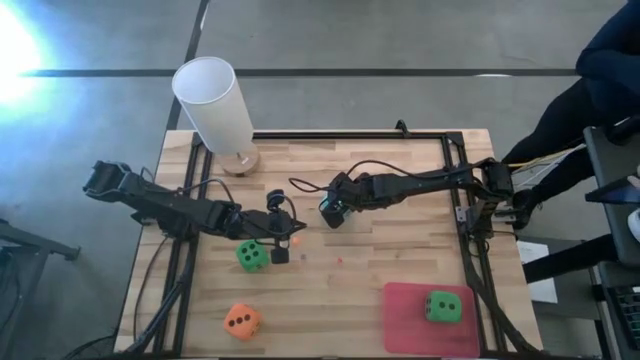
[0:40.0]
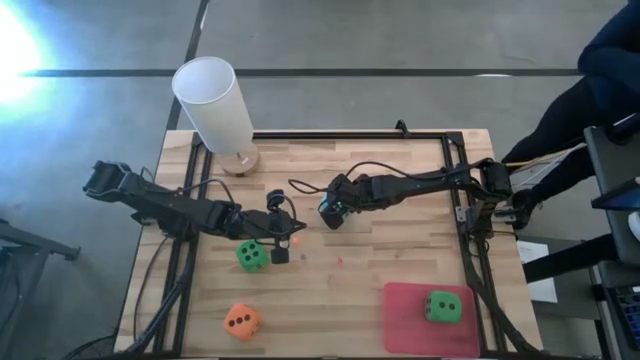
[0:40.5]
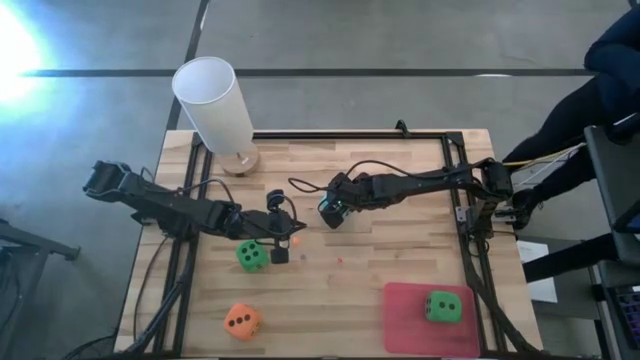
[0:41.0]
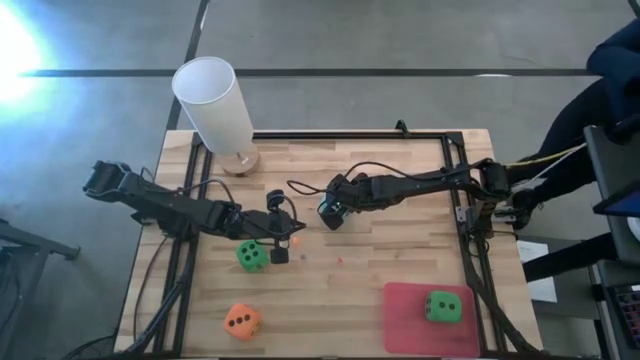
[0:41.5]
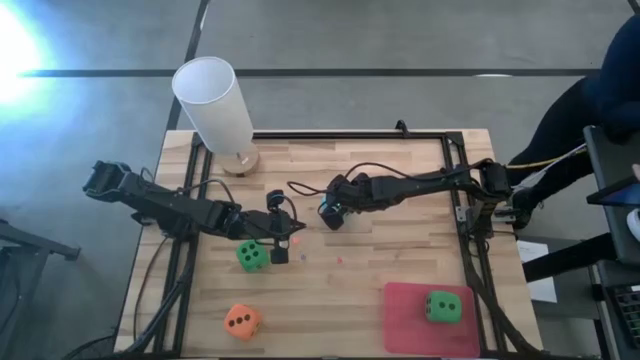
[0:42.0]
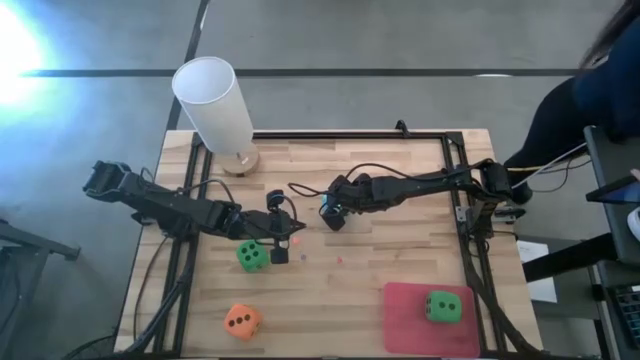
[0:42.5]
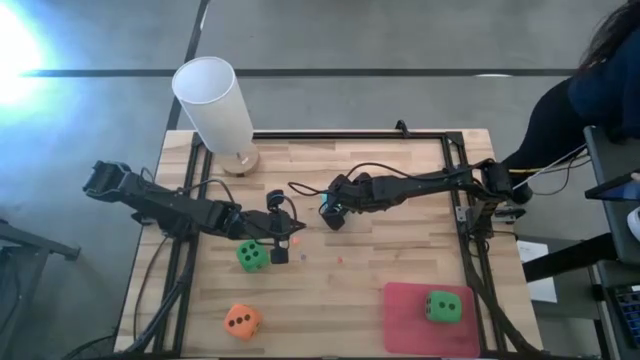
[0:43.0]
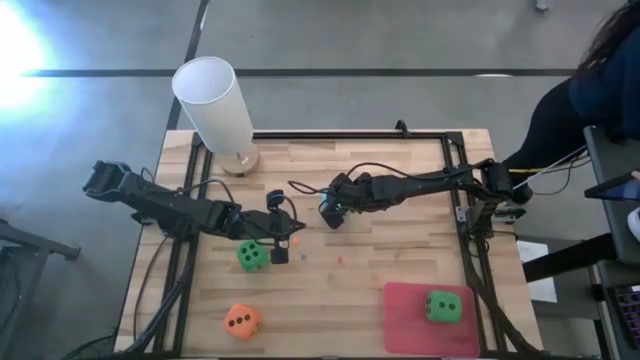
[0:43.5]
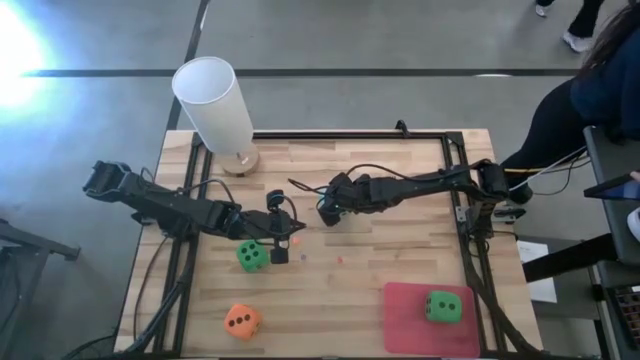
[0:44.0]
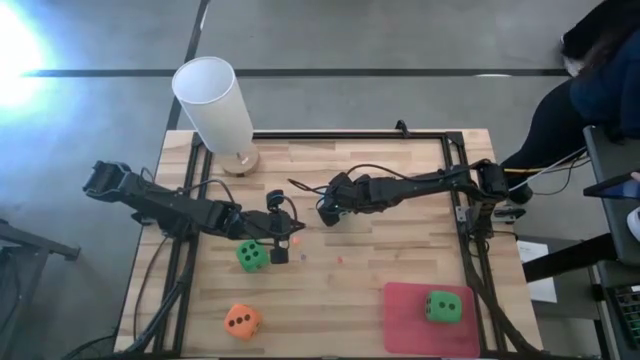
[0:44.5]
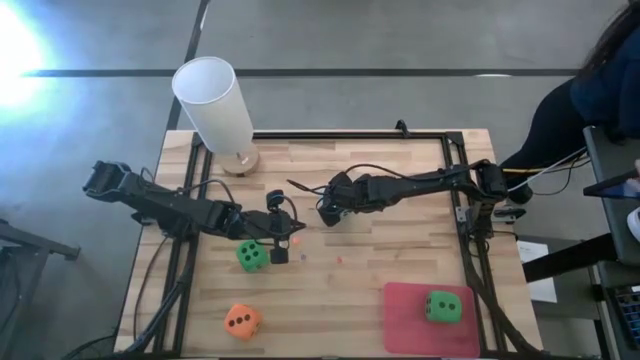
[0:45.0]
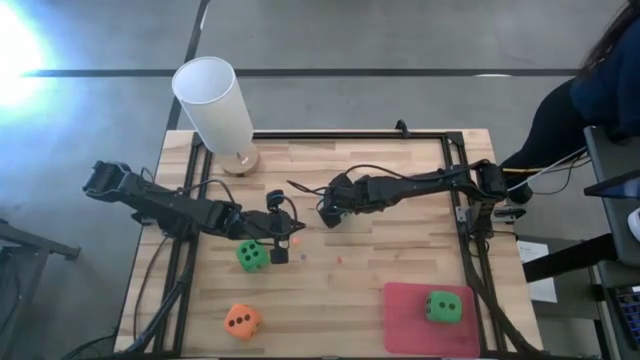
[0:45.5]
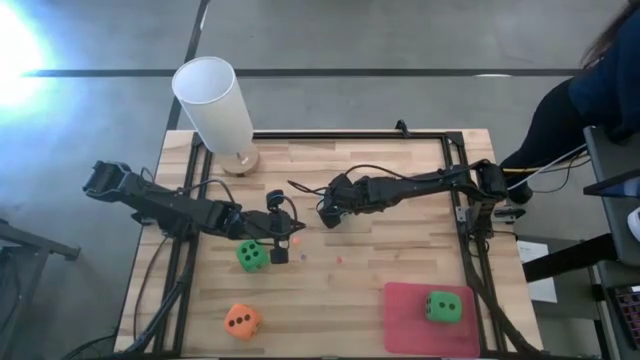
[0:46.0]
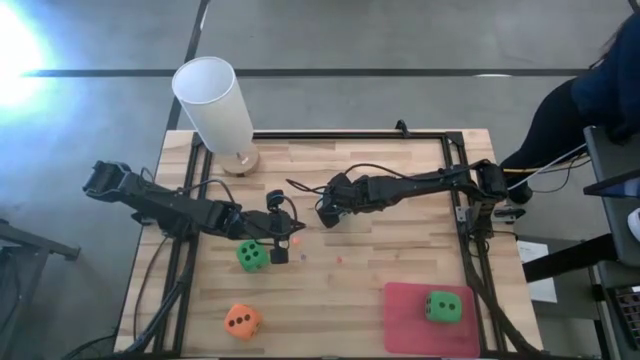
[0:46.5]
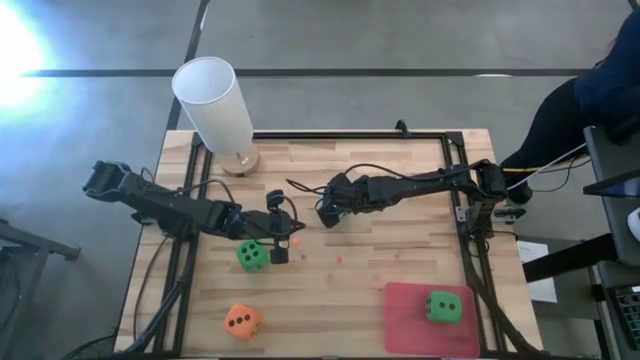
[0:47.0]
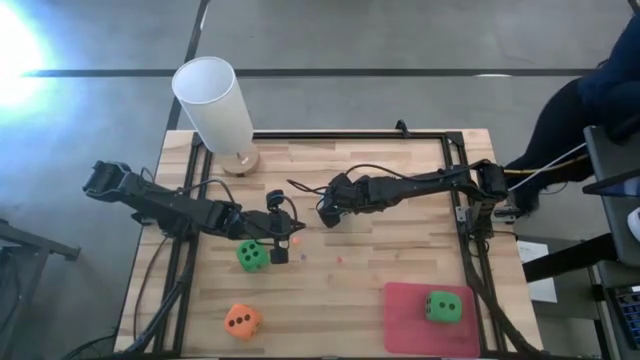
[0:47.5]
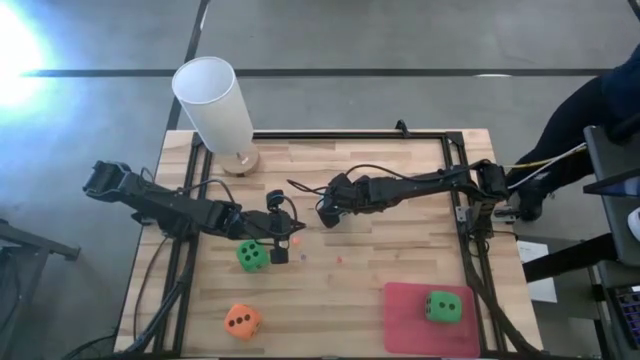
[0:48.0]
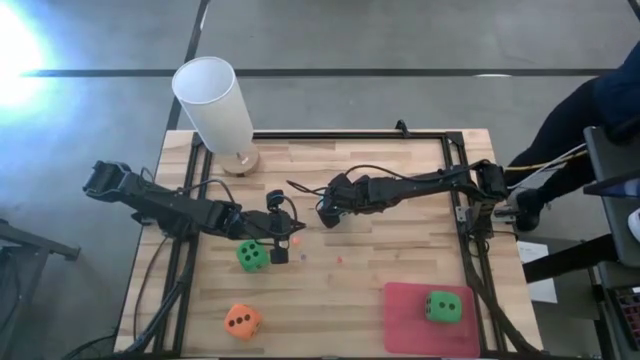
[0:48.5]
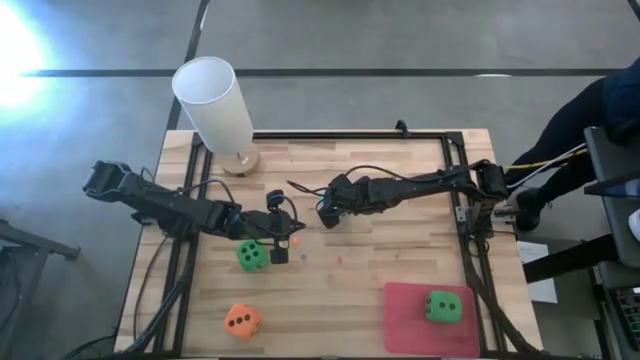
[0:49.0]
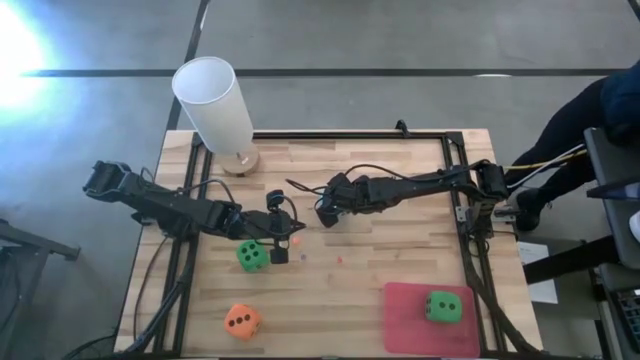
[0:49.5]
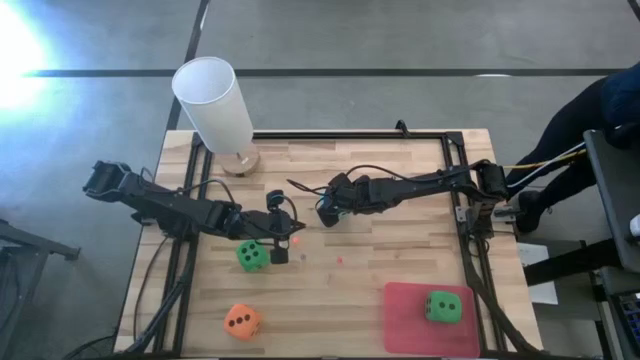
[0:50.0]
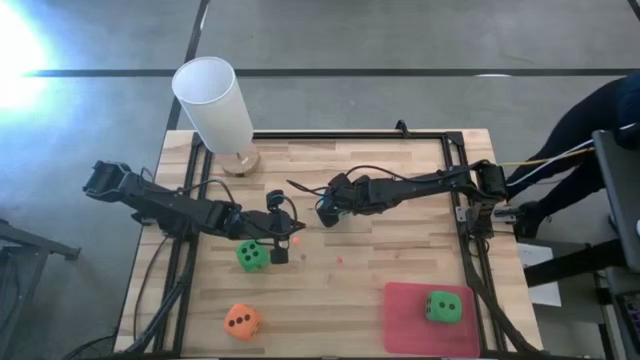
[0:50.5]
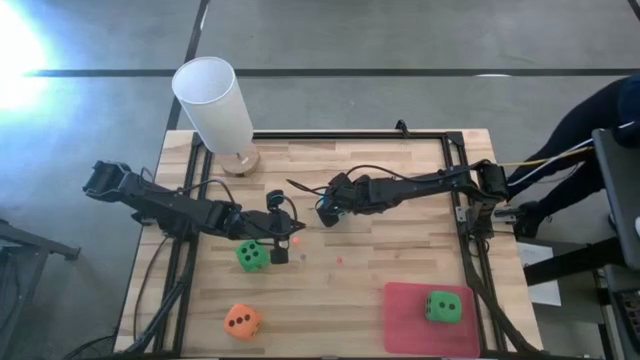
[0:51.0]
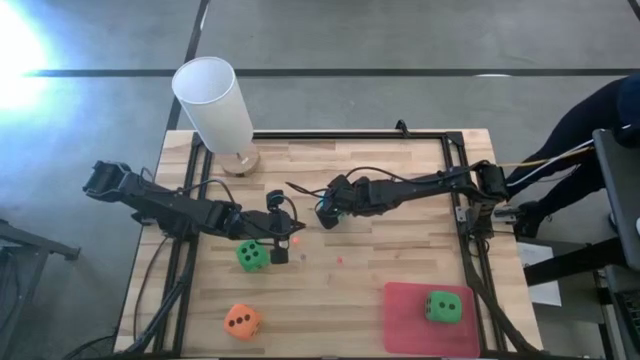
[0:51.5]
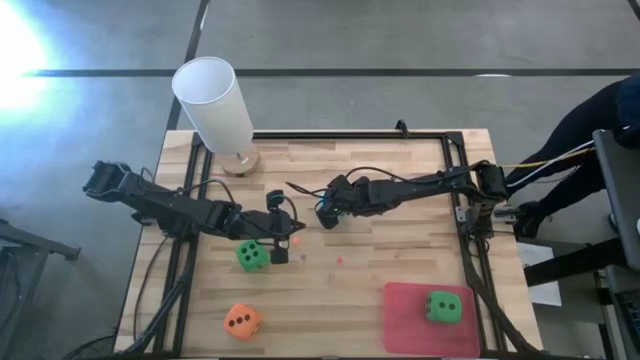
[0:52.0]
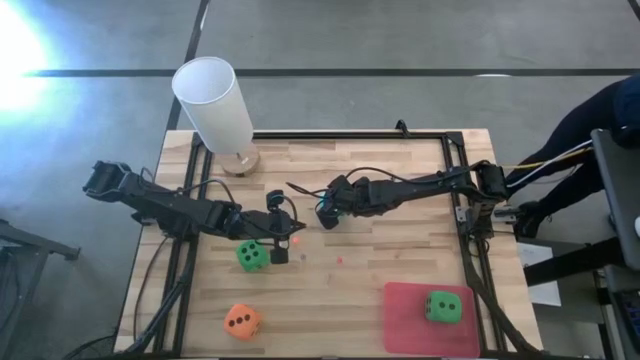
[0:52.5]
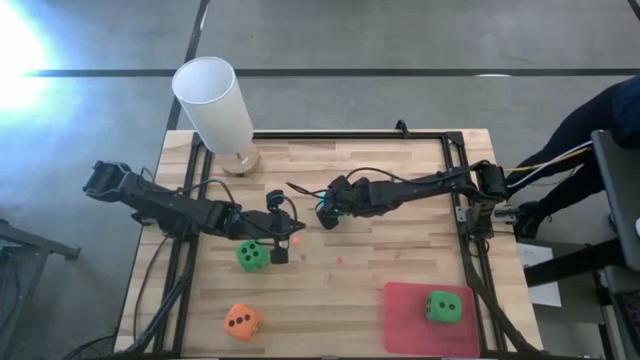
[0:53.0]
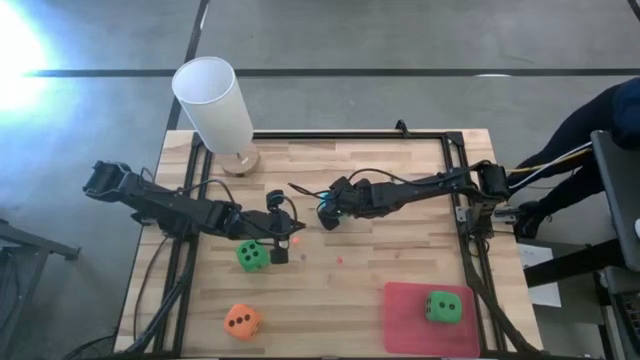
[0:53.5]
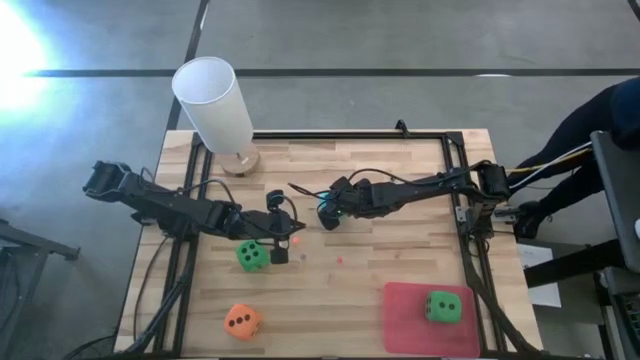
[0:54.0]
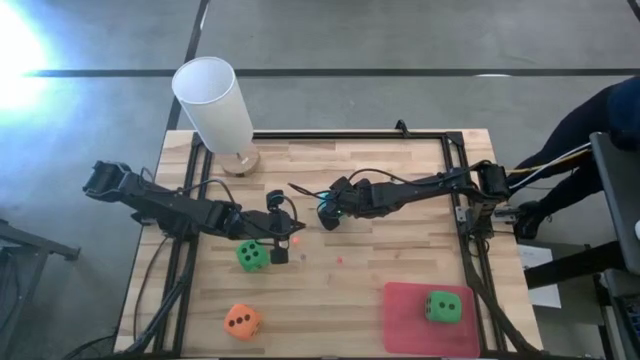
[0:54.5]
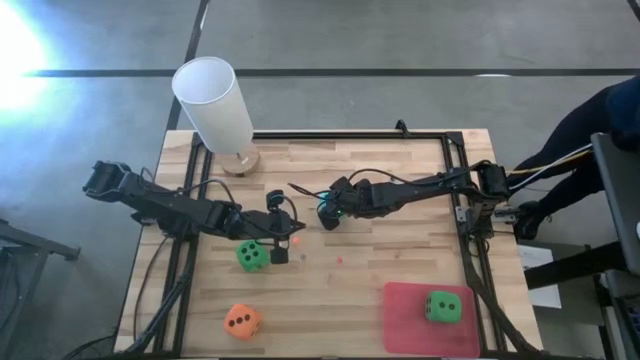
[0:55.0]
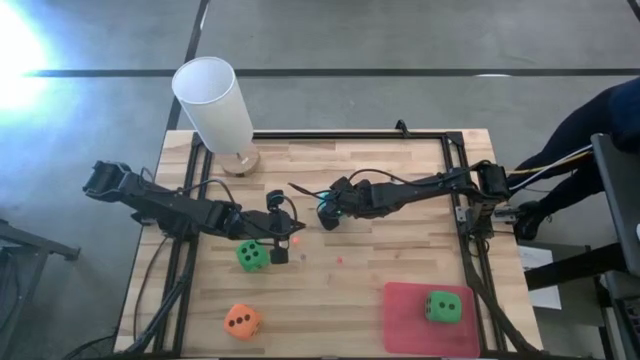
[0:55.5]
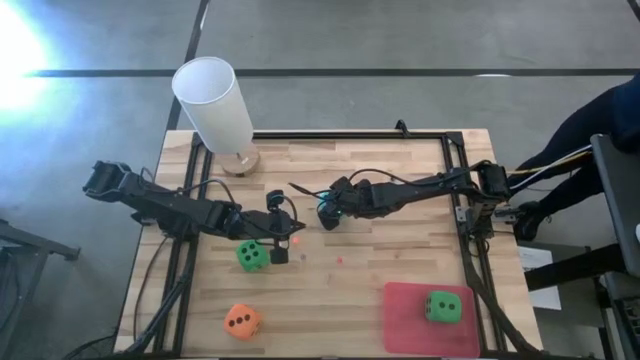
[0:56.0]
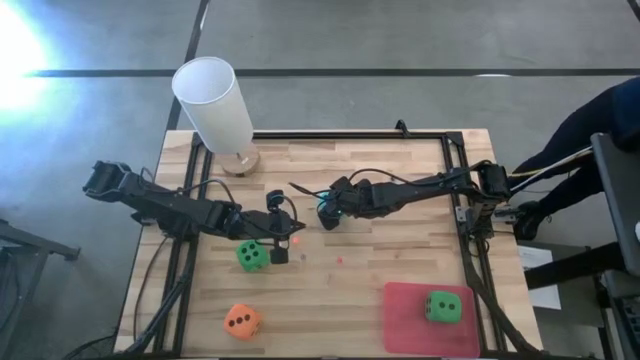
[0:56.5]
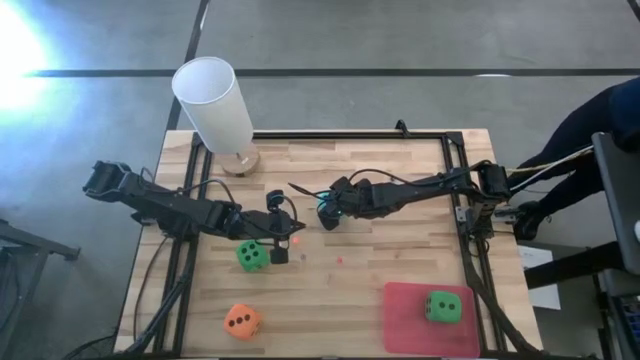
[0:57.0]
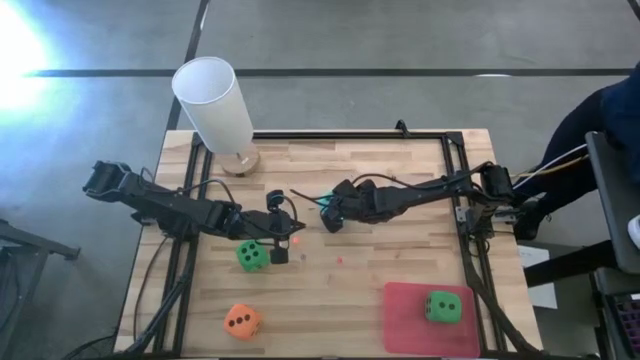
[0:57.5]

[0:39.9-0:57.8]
Task: Pick & Place Dice
Put the large blue die into the bin
